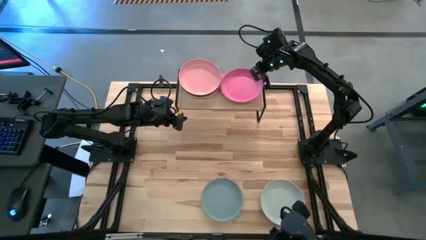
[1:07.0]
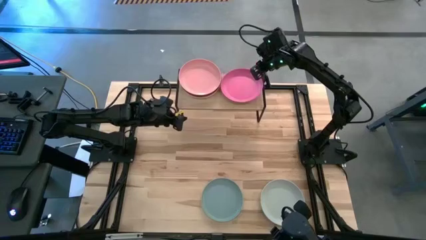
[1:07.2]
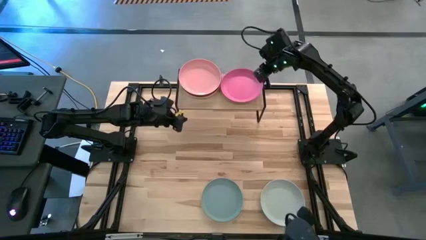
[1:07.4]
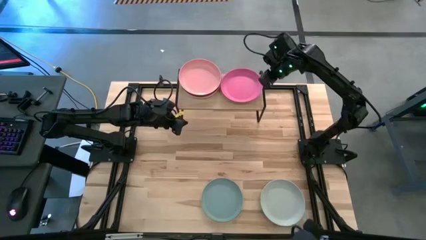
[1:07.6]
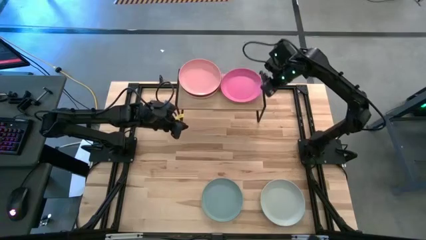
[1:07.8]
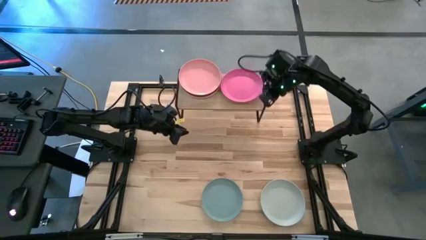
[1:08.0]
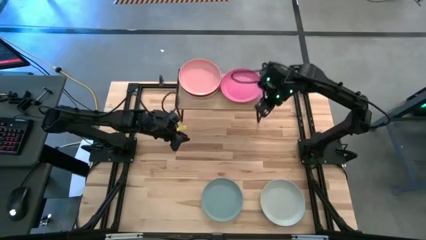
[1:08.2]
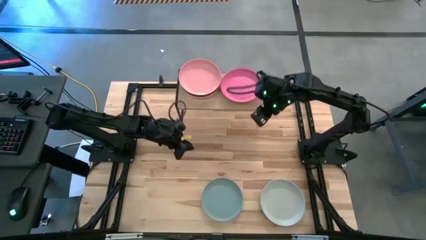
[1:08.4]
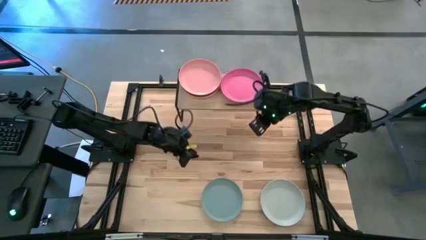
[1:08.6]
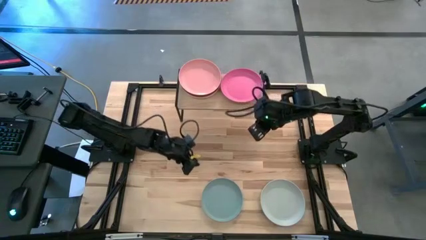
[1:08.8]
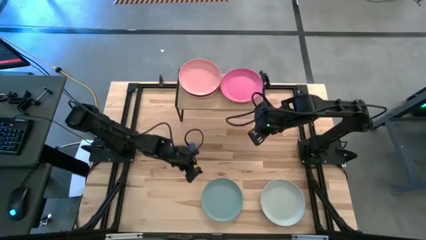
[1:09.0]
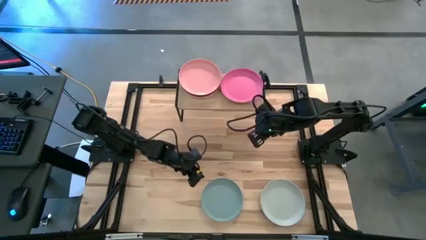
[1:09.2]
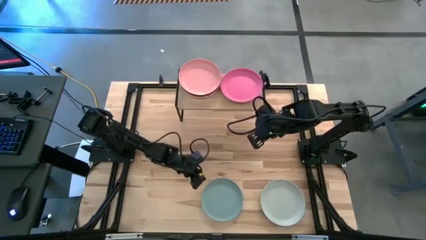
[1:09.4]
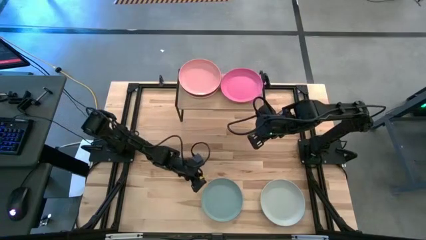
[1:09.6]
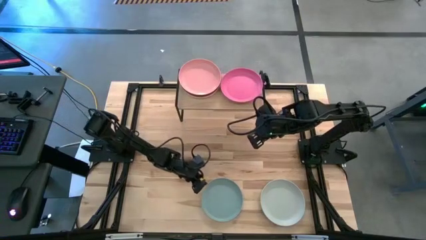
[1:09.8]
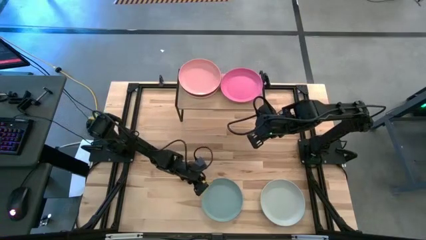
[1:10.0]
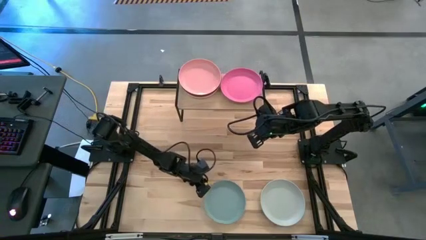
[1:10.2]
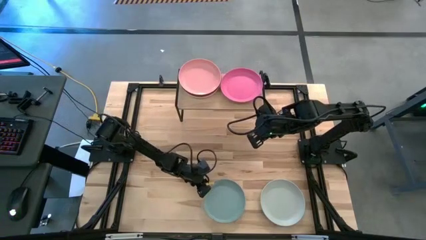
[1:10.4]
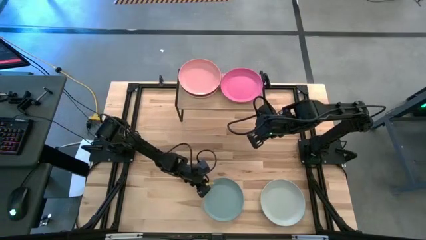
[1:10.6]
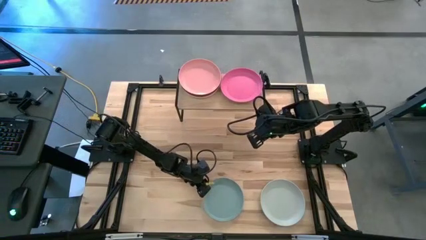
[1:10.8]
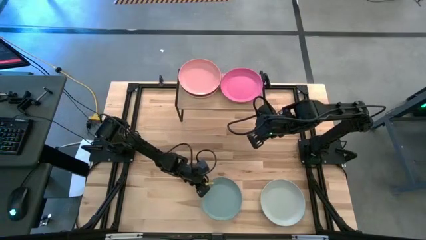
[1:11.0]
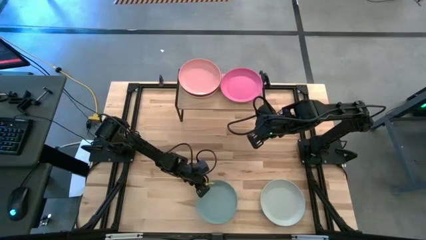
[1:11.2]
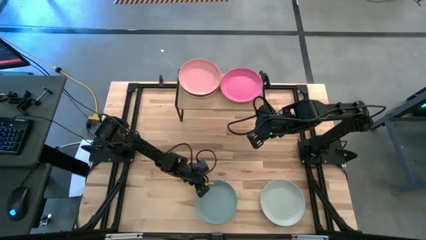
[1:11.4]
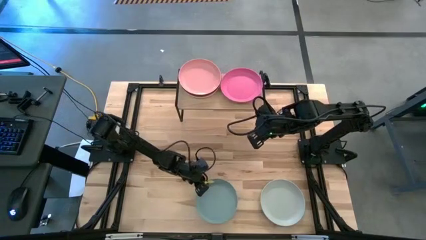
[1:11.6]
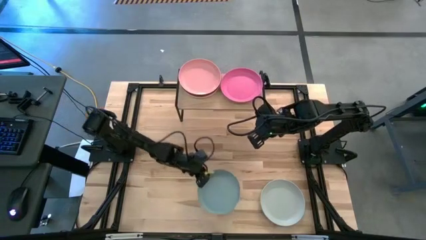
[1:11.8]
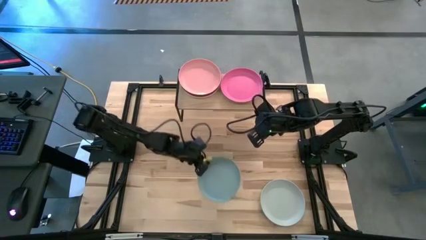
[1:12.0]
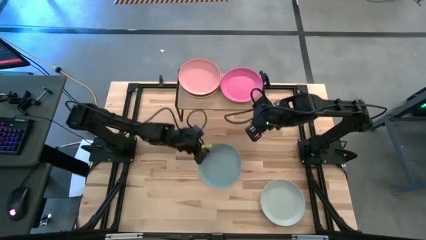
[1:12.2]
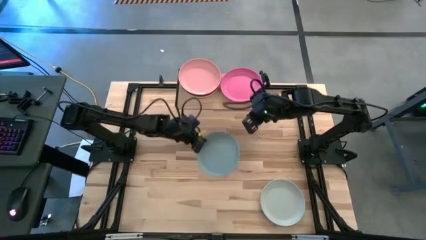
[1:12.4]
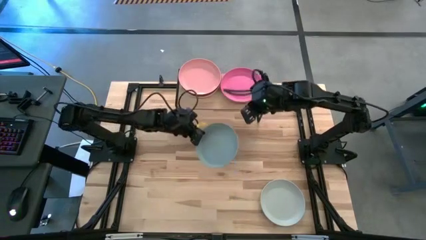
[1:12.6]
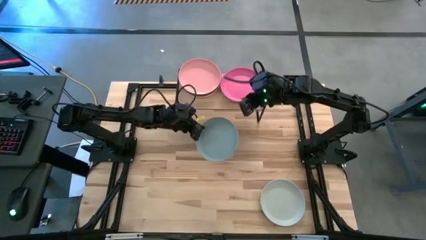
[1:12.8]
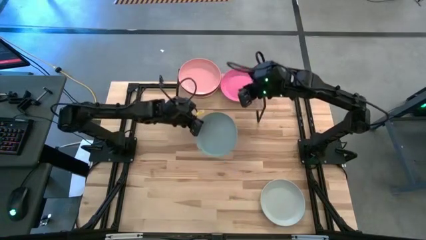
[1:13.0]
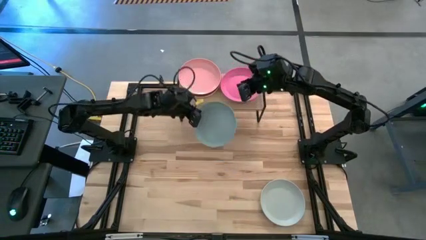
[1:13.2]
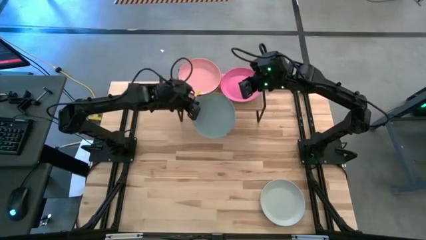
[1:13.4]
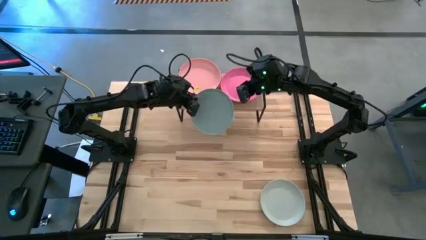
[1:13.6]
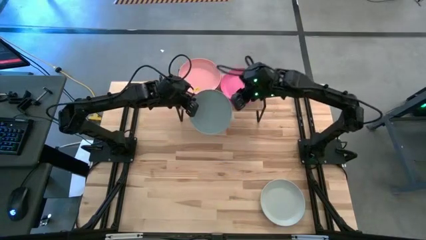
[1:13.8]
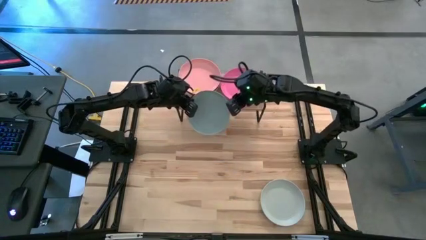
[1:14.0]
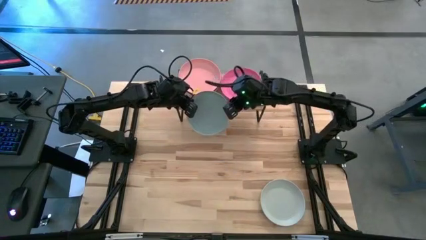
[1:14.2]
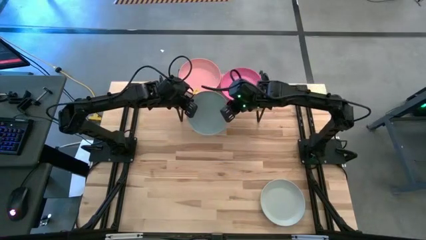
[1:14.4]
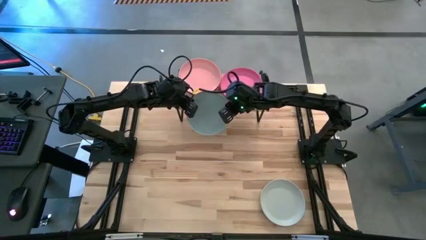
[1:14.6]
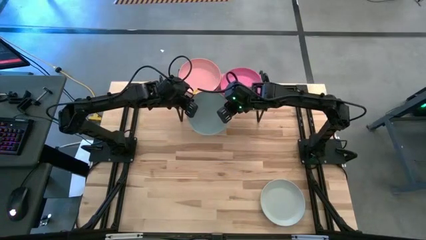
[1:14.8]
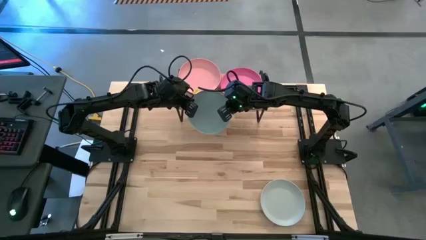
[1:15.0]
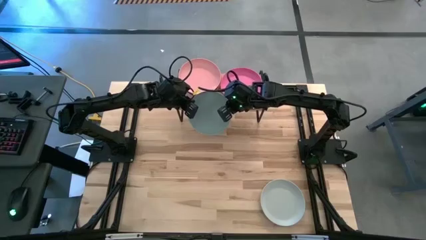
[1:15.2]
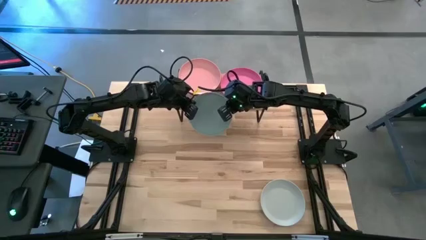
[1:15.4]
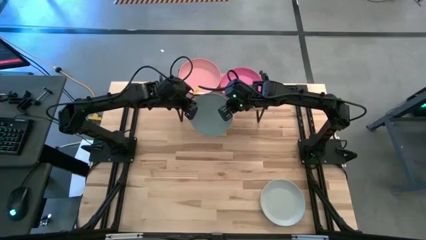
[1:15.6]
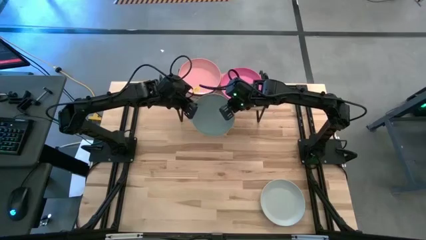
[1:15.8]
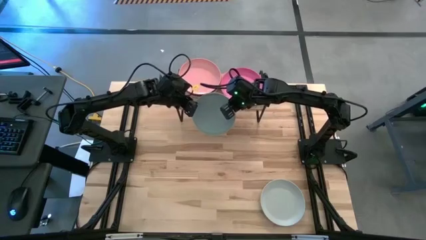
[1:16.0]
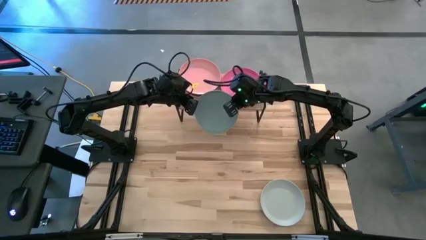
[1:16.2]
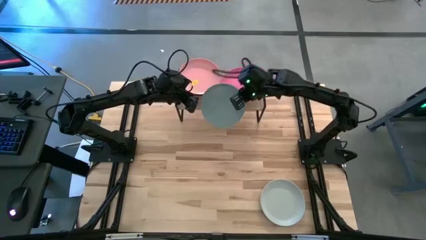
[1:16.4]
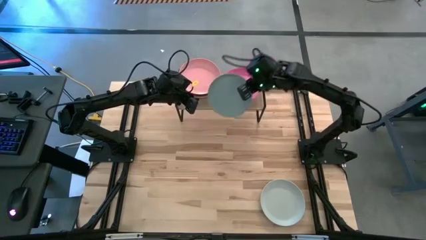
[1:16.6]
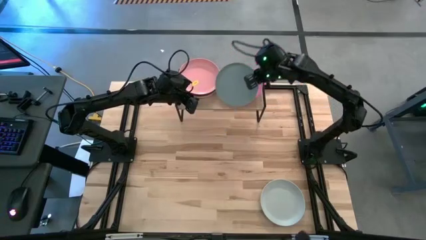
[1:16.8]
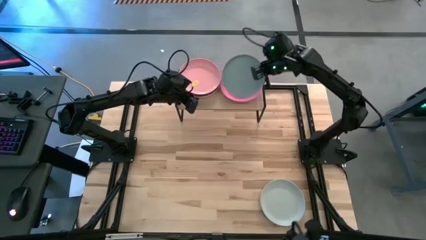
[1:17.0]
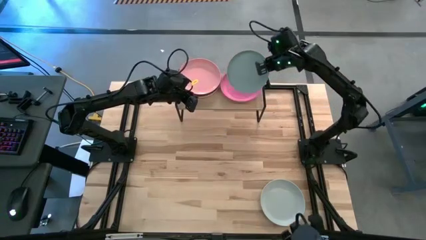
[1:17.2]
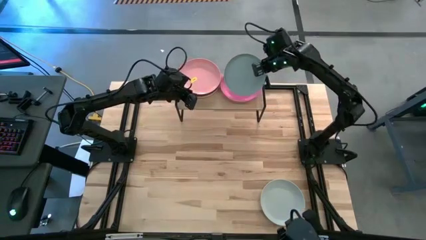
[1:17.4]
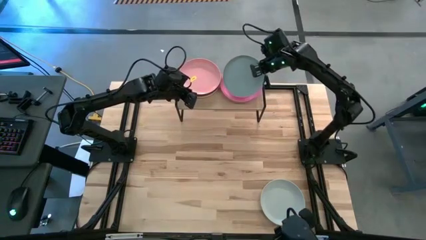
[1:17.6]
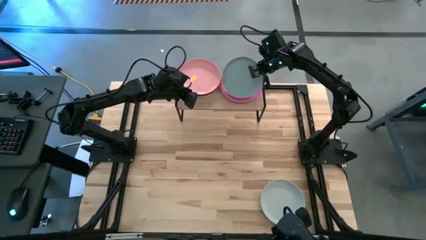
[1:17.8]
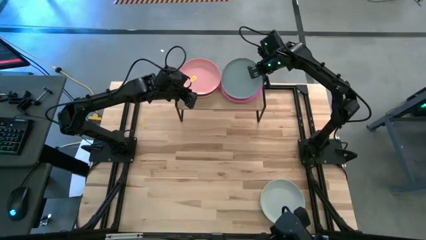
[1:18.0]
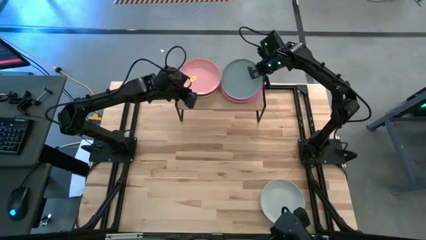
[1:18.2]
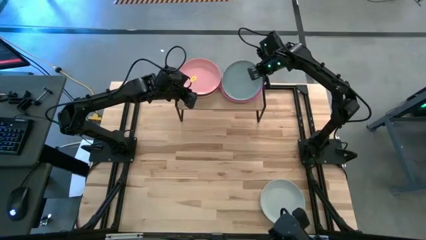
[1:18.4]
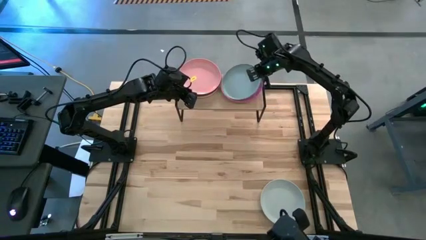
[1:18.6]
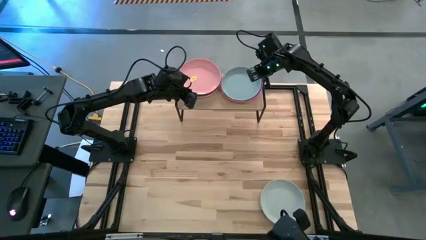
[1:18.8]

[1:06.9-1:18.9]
Task: Place and stack plates onto a shelf
Stack the blue plate on top of the pink plate on the shelf

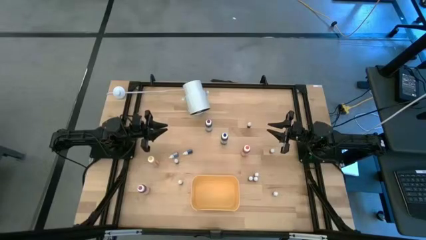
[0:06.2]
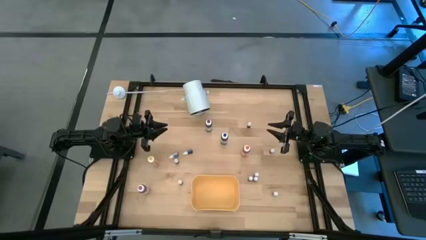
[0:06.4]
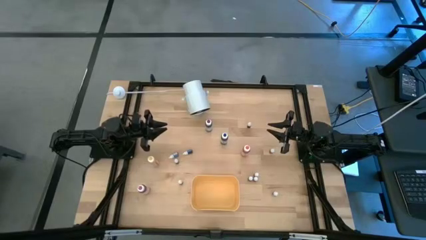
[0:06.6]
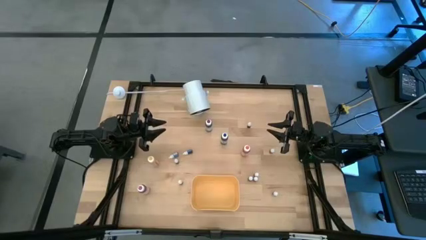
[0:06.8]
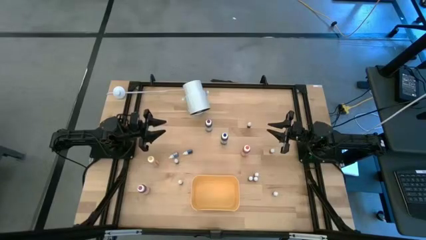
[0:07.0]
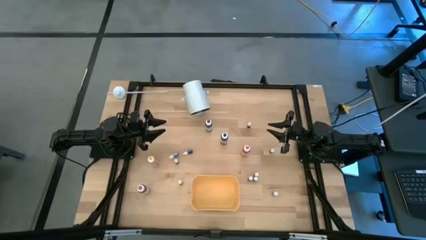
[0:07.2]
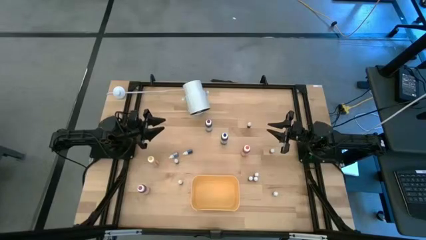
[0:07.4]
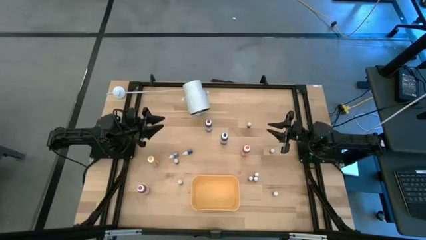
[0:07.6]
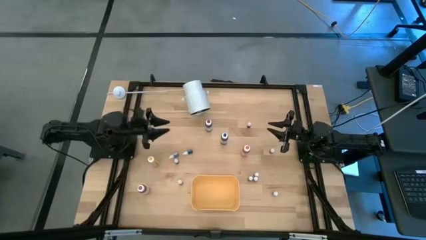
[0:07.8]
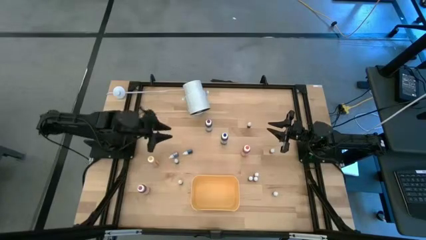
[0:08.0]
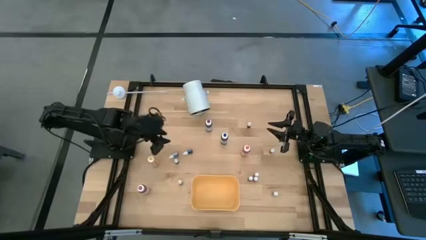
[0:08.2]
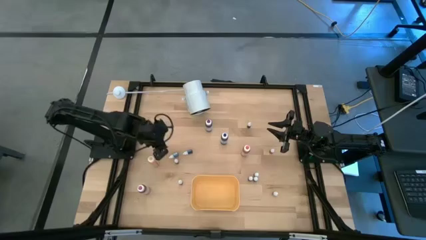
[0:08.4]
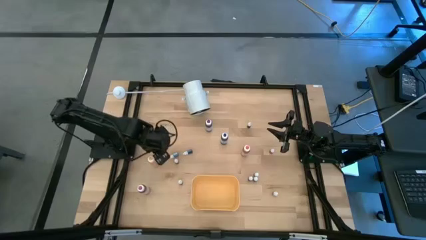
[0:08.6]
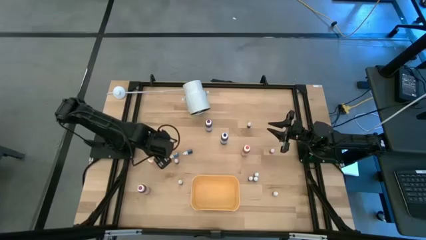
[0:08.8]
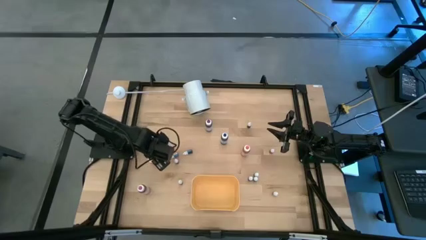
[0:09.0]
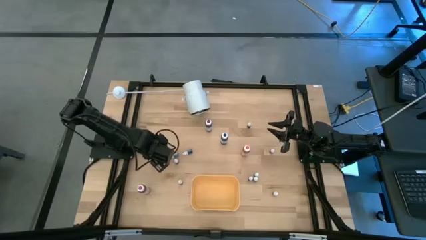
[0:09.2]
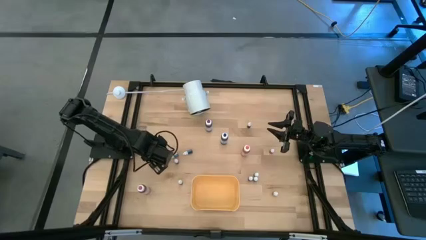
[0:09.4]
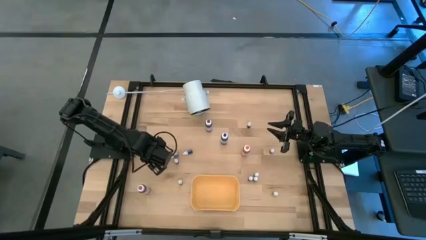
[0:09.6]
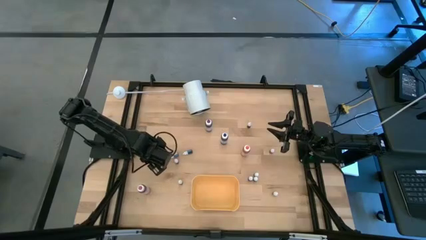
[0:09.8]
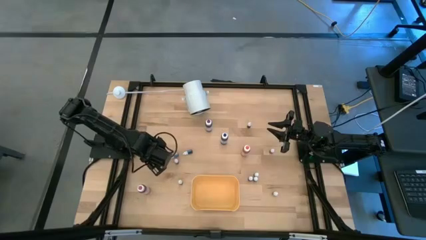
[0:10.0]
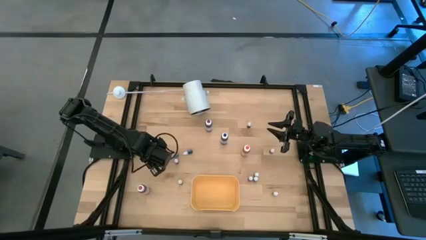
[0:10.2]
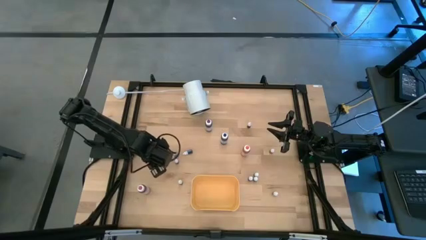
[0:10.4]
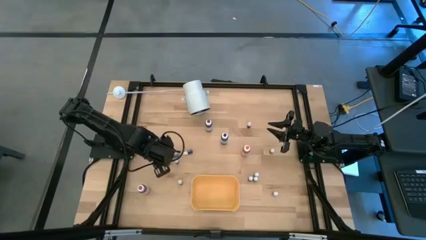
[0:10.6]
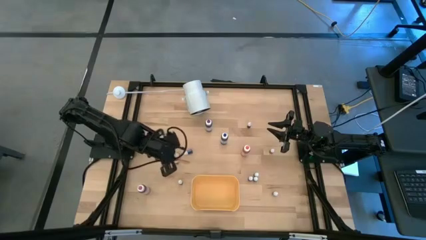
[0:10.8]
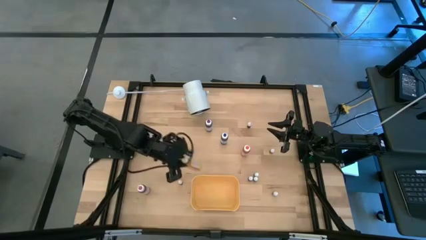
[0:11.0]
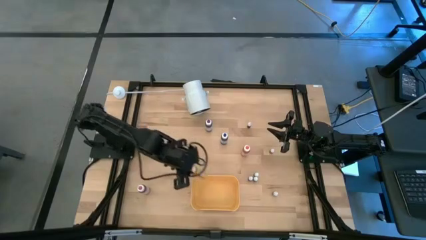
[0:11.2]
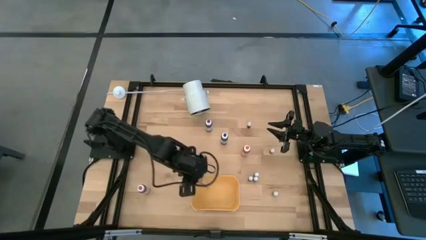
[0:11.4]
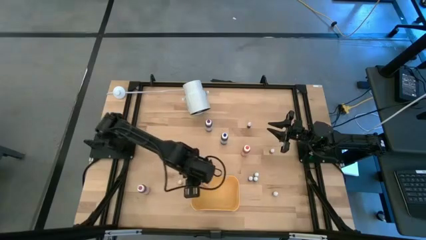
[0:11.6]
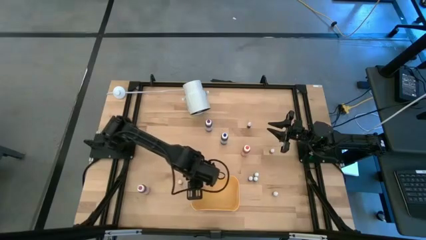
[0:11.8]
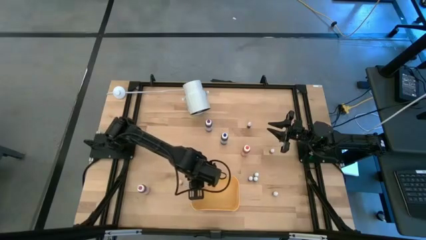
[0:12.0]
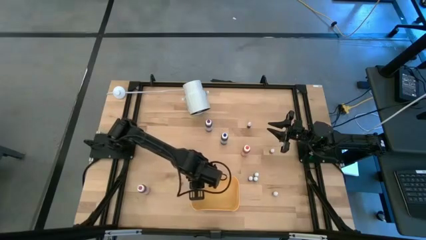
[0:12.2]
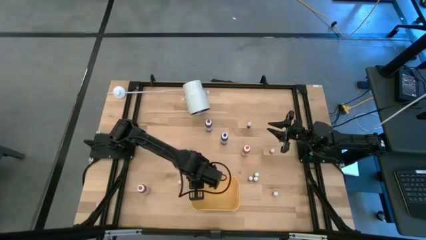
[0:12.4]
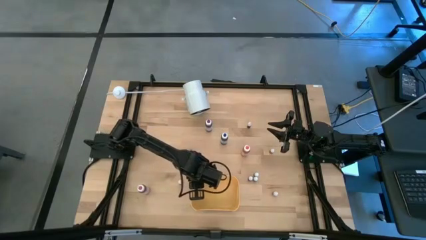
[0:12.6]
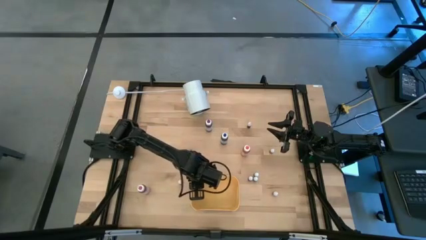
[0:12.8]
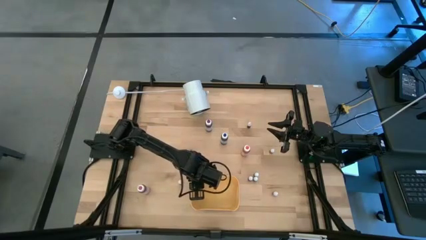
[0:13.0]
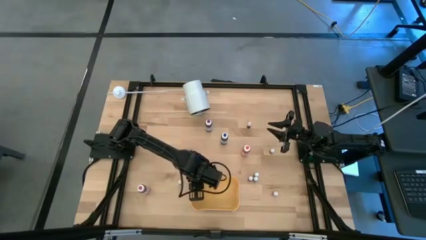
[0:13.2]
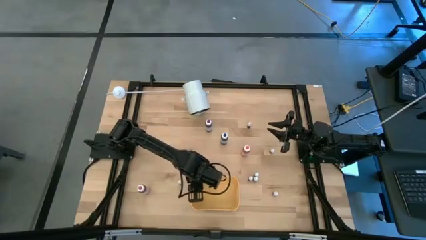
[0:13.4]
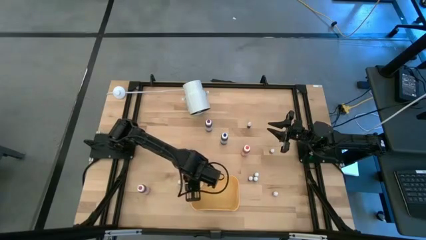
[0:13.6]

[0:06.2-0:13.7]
Task: Pick & Place food coloring
Put the big yellow food coloring bottle into the yellow bin
